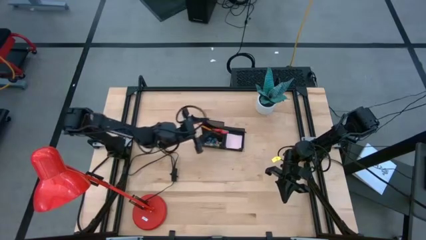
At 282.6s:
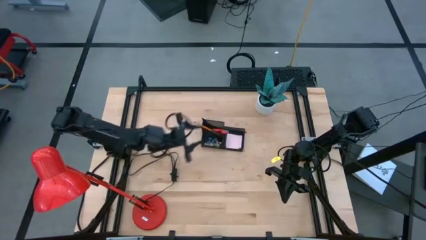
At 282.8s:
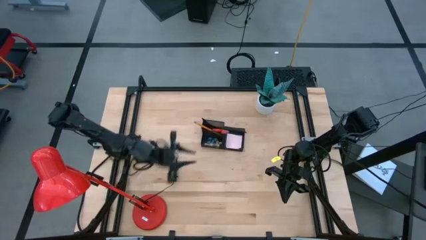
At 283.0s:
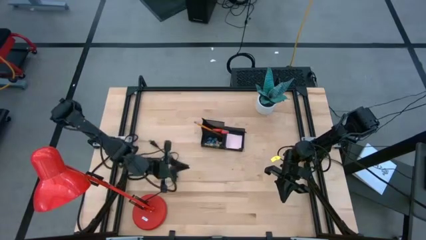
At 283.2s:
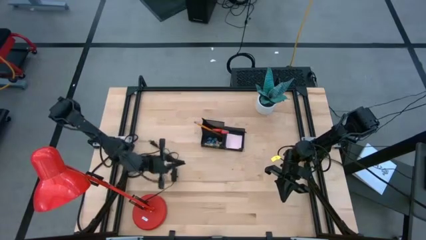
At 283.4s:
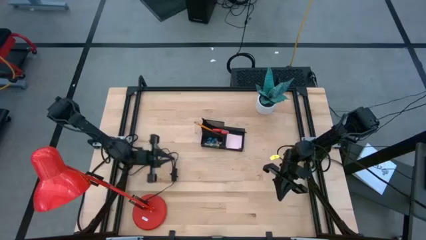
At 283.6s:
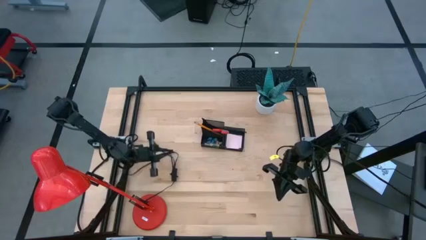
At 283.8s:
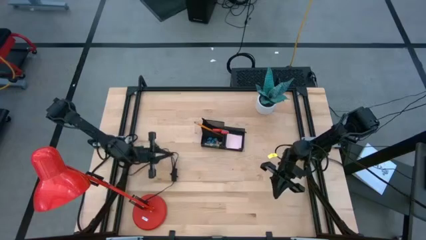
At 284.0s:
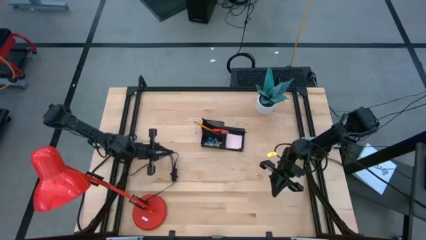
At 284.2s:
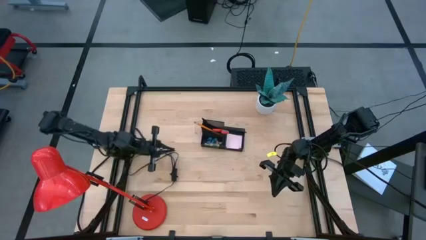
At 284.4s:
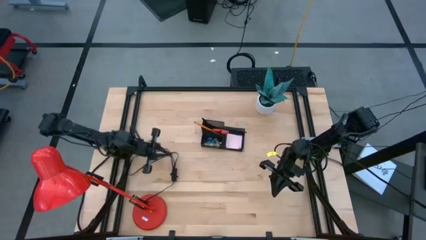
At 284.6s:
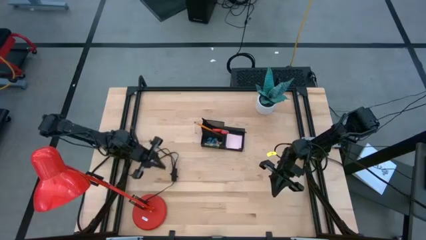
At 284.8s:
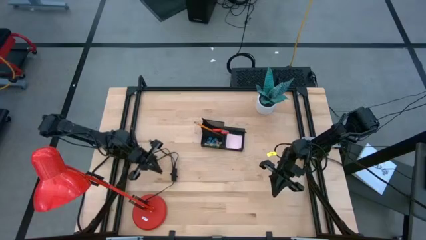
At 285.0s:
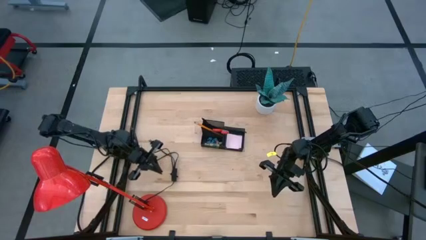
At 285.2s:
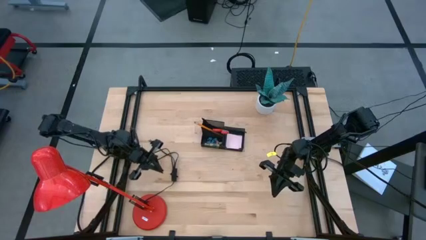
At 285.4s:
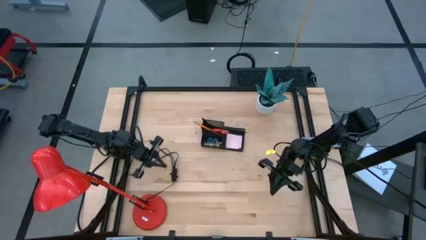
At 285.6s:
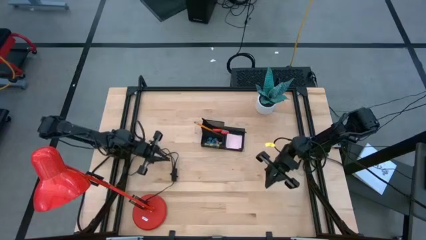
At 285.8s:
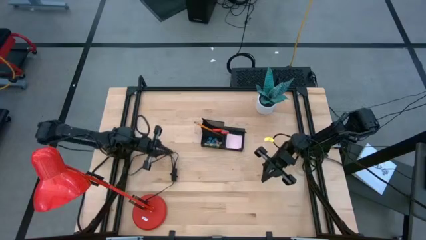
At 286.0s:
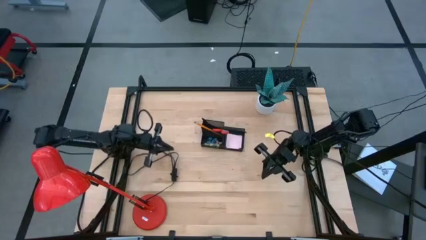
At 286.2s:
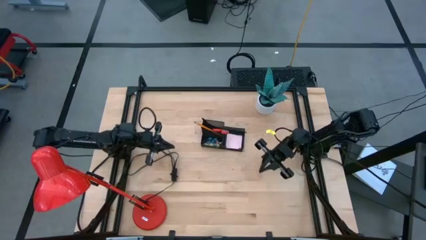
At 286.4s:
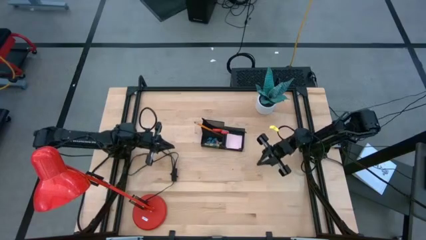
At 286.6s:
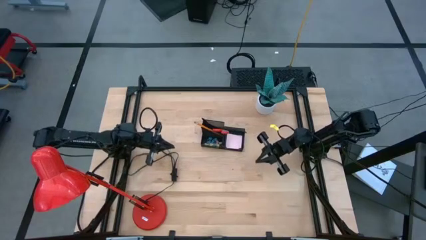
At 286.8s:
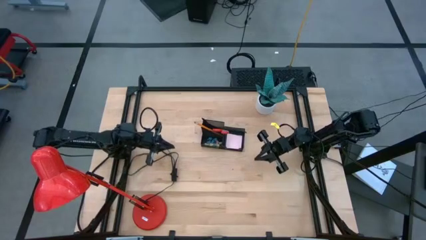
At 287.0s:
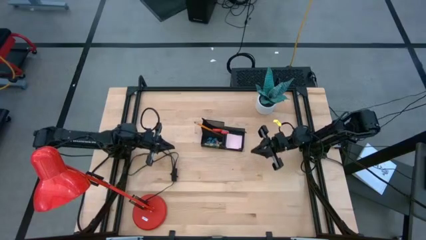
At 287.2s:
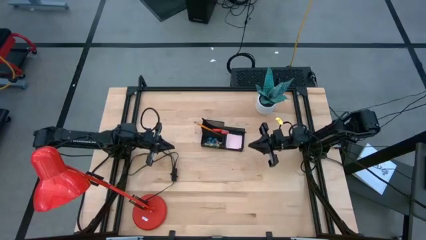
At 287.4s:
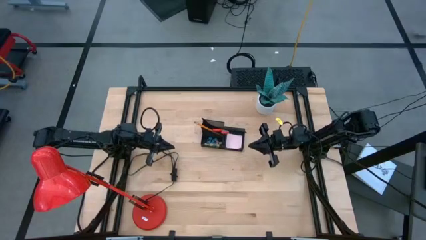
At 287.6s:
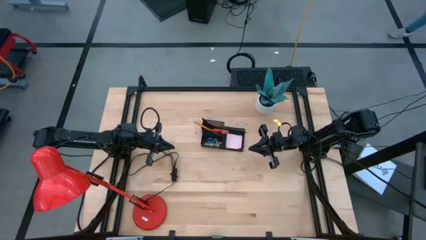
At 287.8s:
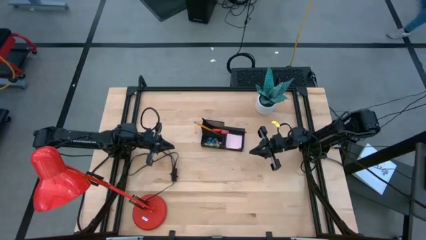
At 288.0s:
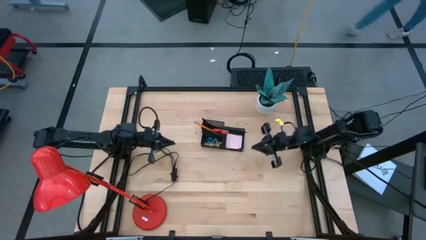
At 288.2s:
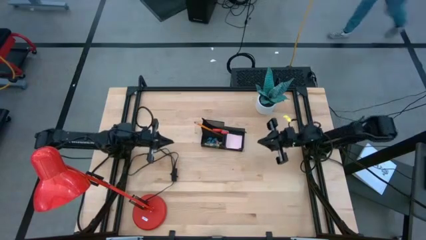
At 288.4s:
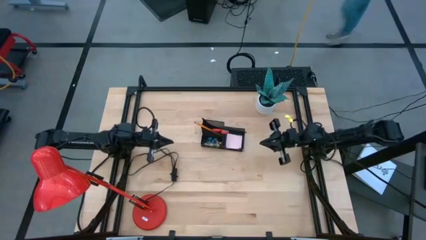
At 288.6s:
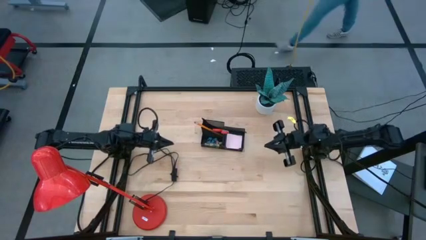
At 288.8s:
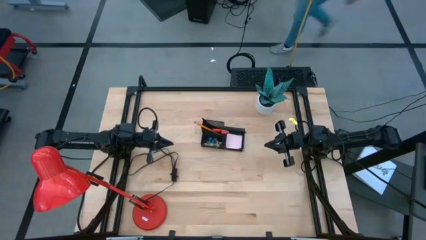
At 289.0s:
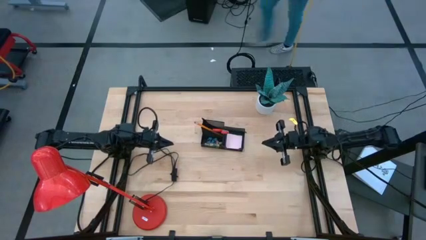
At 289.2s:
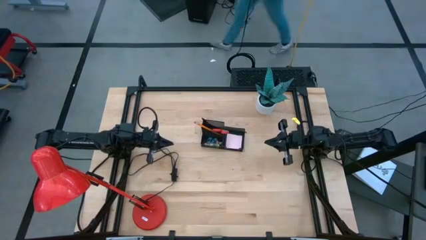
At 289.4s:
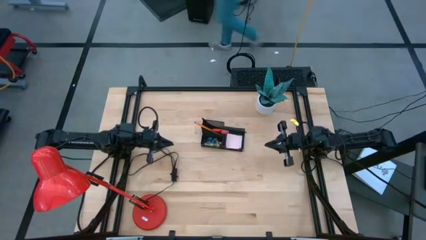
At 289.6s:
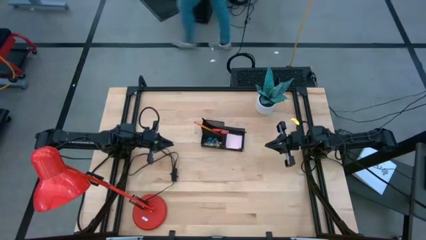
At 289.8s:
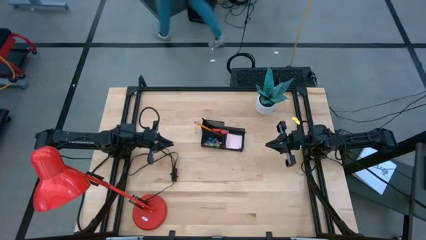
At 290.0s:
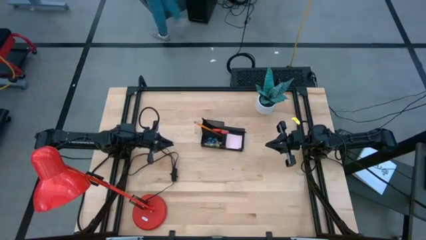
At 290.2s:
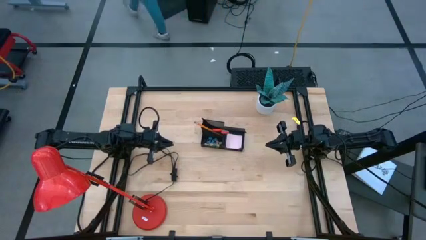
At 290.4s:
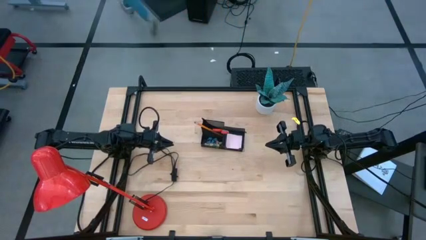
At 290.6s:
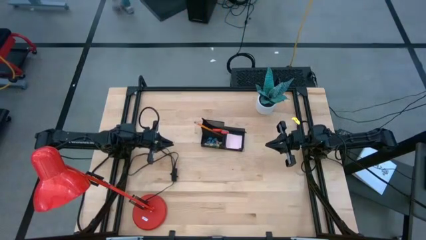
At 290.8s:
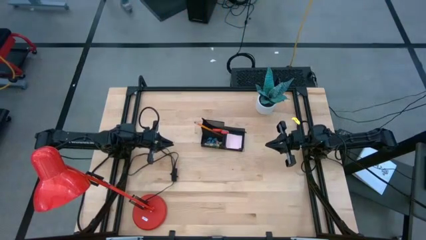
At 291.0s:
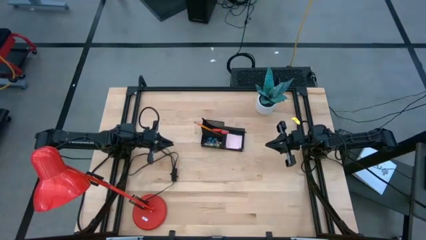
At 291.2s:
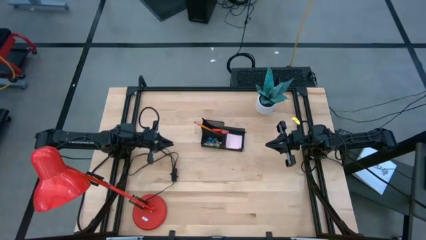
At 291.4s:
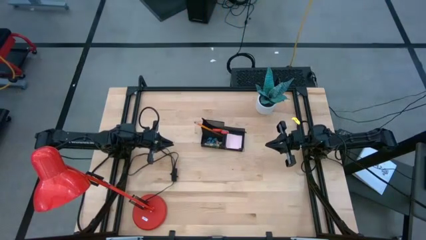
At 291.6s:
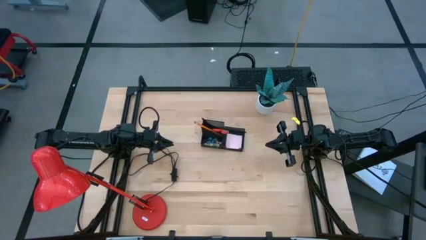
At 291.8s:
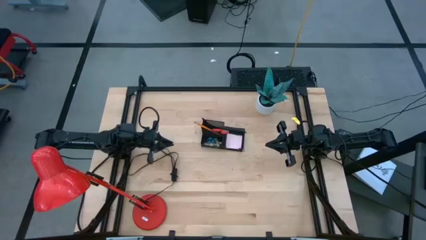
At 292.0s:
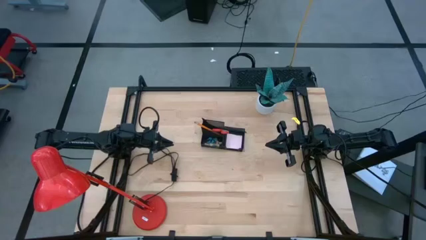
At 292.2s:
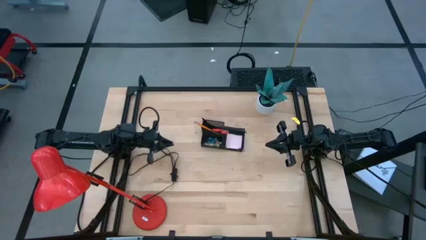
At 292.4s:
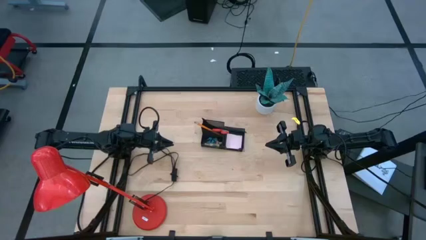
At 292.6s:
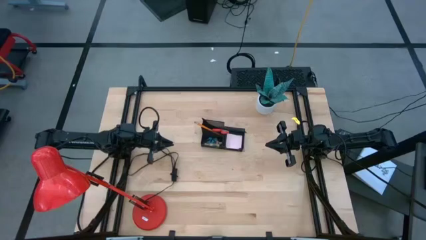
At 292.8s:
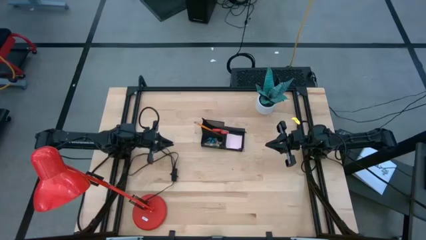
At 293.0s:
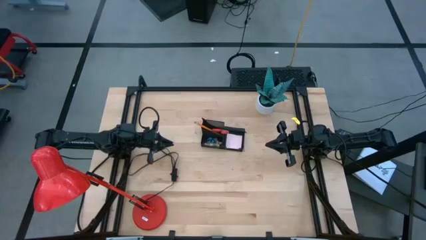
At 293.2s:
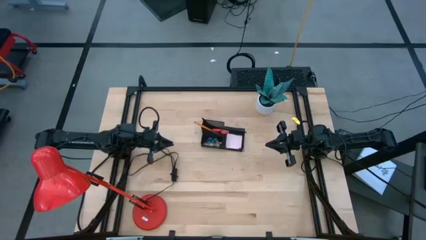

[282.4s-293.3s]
Task: Pick and place office supplies into organizer
Return to Home Position

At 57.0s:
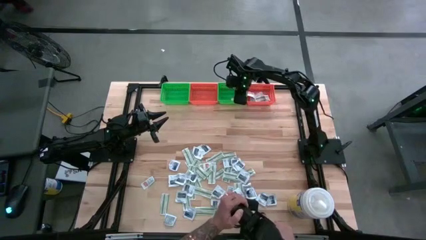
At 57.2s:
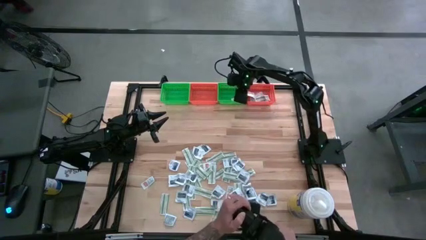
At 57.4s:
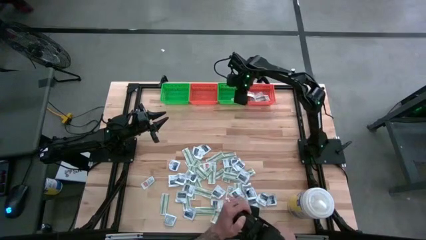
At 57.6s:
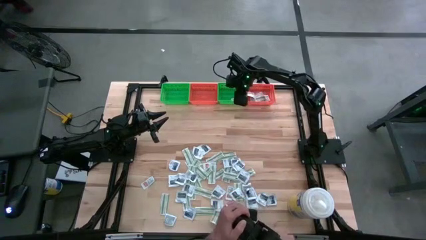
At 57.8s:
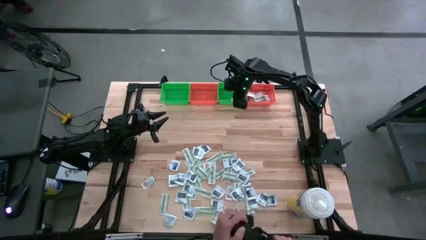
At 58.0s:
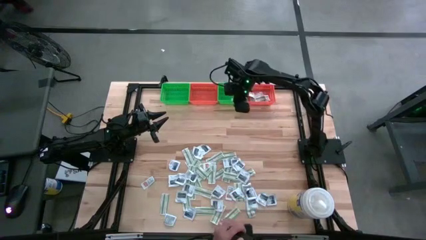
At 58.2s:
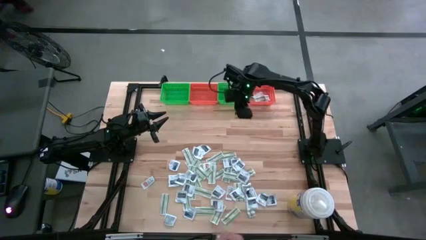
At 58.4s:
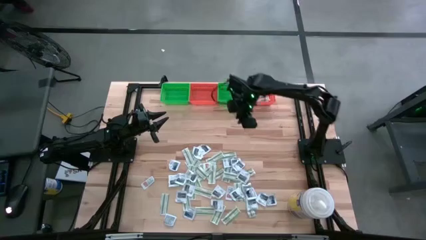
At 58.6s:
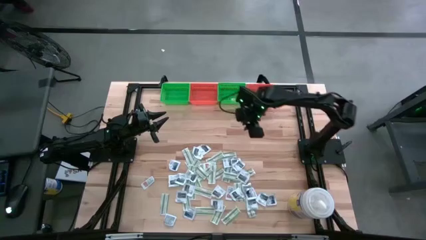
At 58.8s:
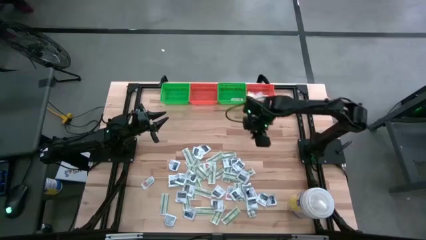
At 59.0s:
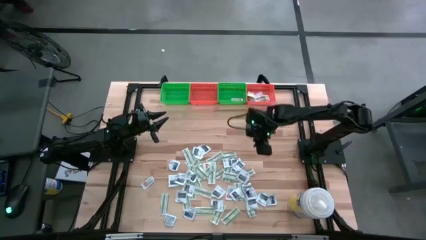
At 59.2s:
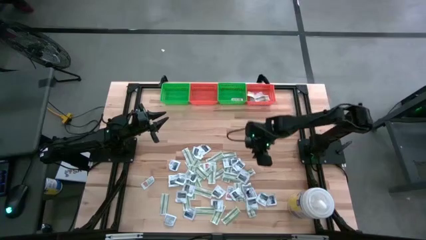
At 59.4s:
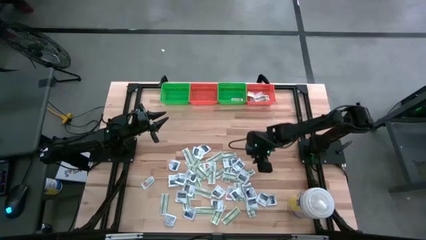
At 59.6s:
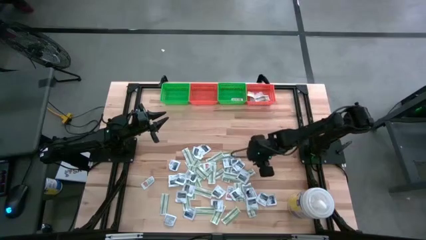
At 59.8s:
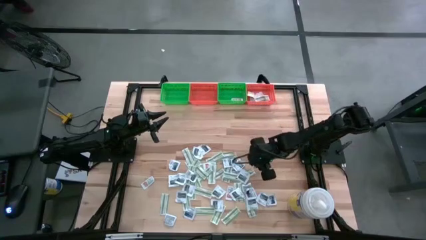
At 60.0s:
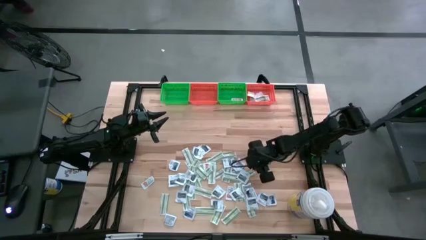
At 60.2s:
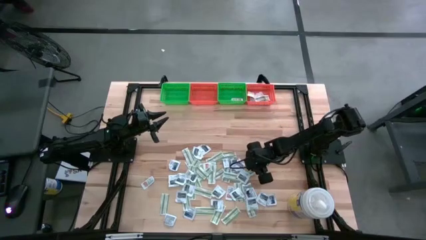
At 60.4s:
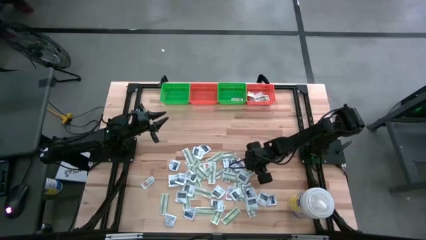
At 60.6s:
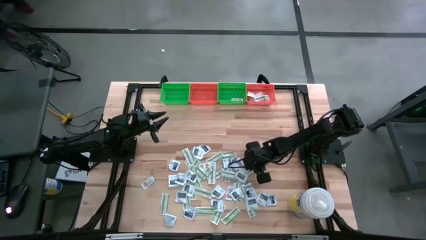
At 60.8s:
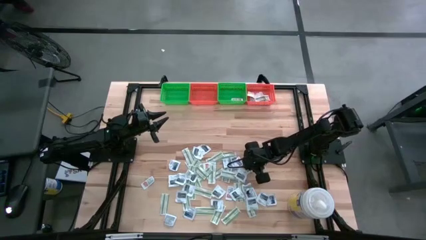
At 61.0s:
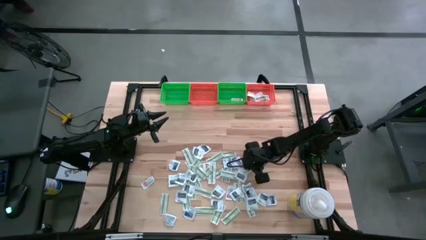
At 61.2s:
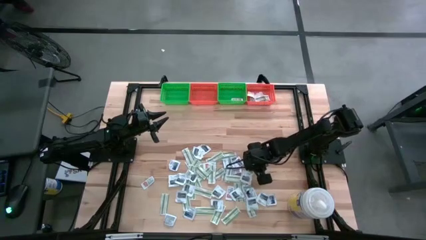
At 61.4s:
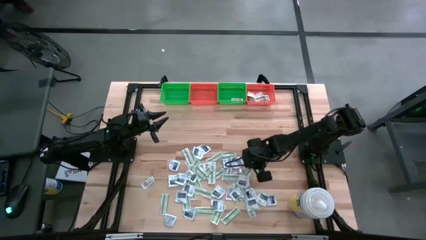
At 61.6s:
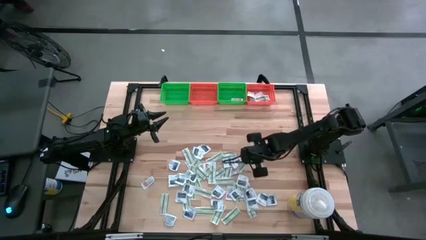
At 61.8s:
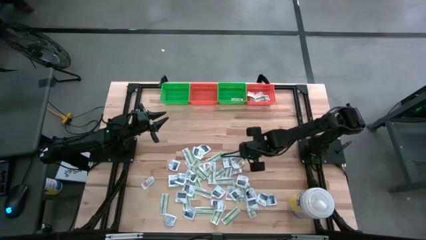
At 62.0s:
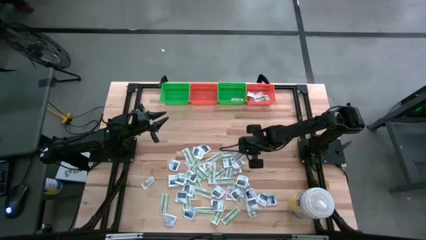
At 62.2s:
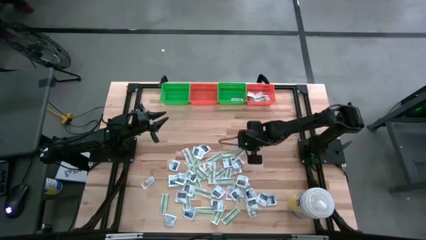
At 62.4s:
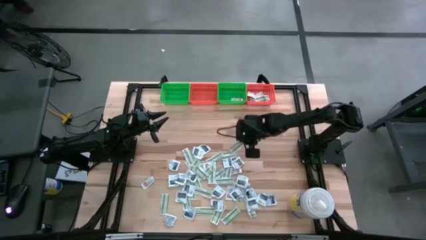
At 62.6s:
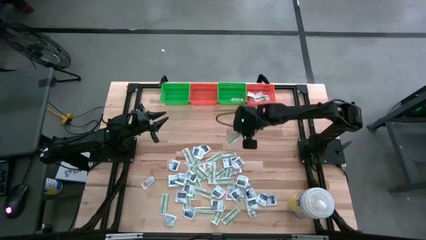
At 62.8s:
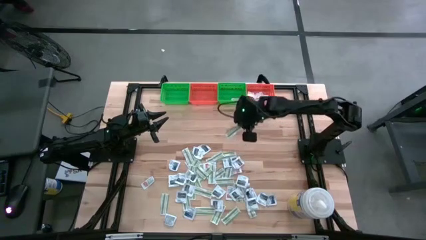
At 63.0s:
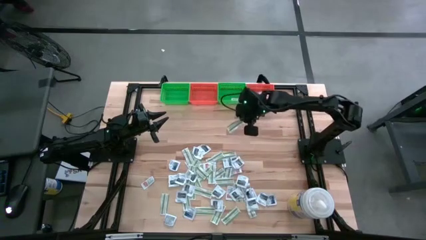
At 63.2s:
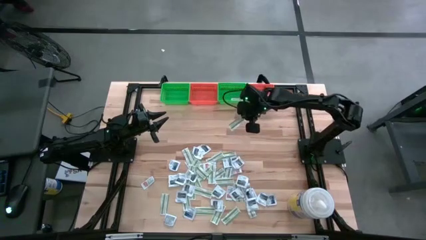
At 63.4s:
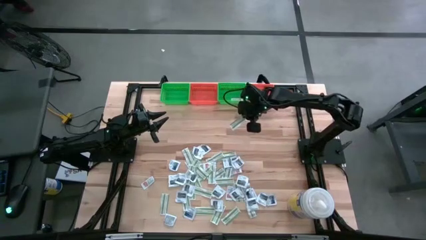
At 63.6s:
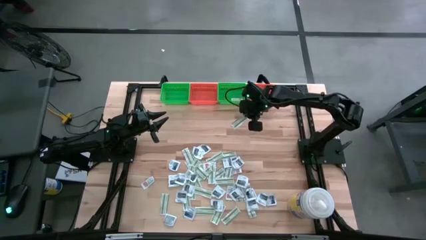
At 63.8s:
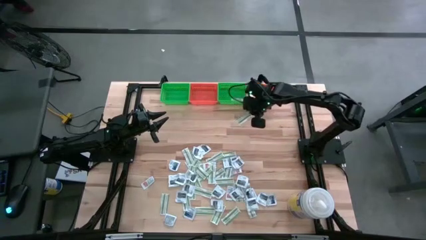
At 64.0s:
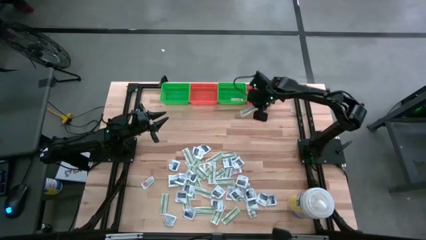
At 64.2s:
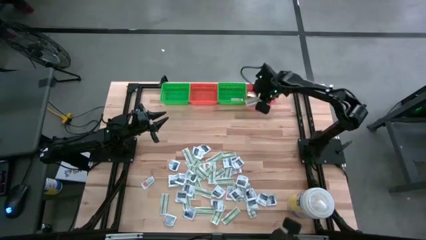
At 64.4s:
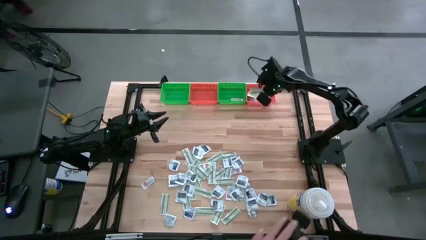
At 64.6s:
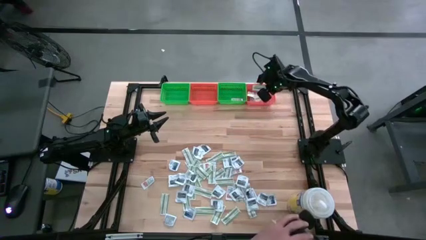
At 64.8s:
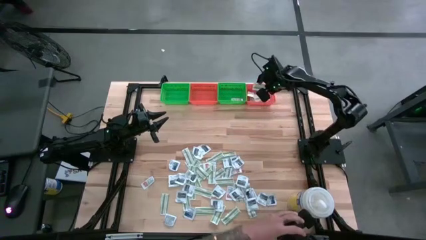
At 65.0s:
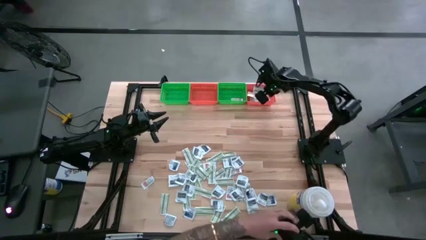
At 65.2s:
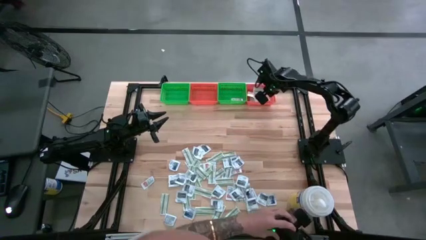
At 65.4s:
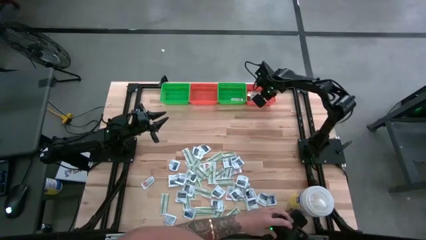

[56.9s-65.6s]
Task: Pick & Place First Aid Supplies
Put the green bandage pack in the right orange bin
